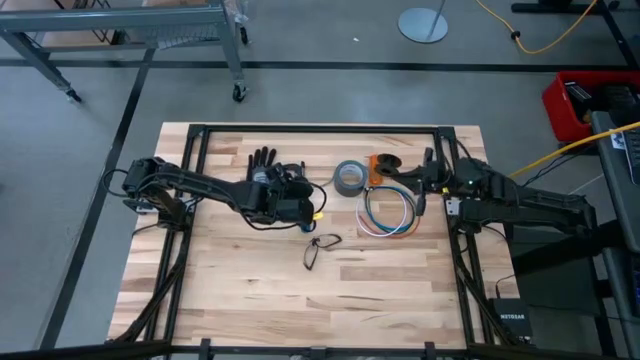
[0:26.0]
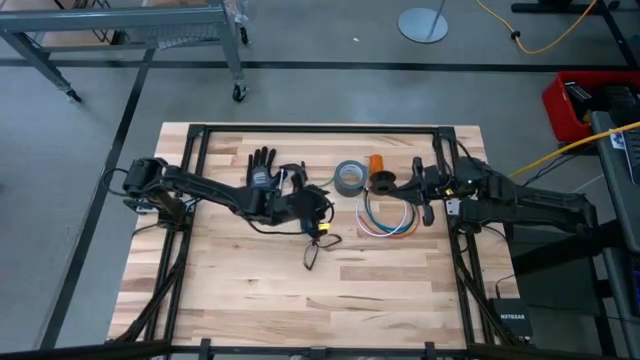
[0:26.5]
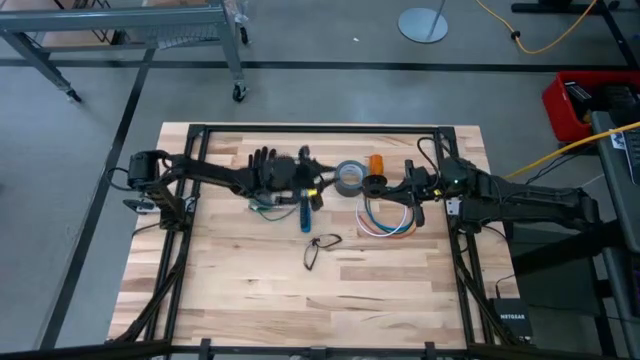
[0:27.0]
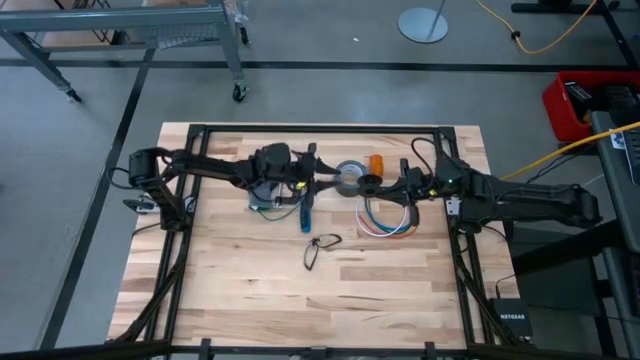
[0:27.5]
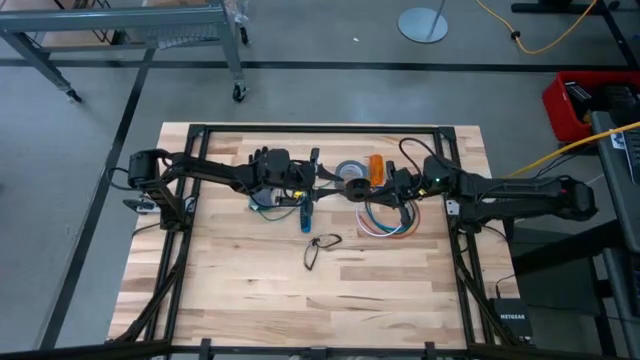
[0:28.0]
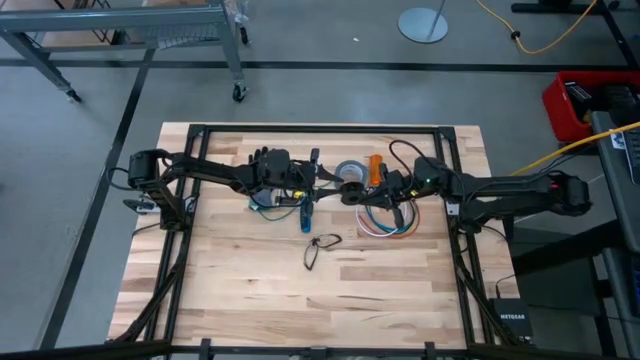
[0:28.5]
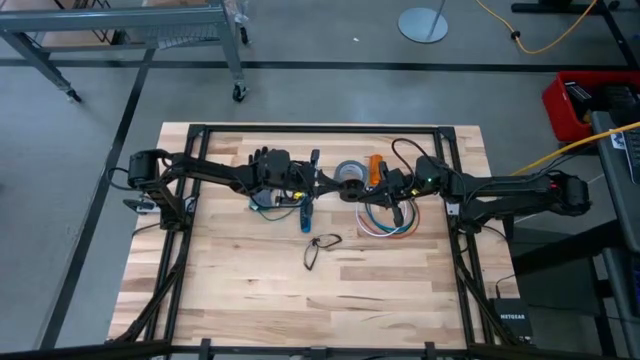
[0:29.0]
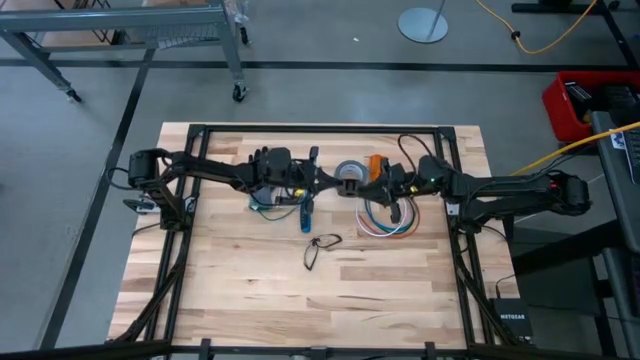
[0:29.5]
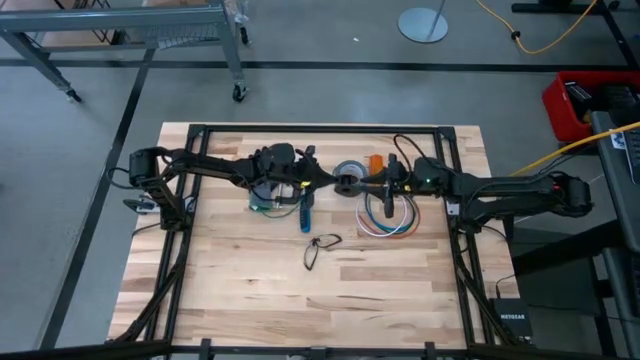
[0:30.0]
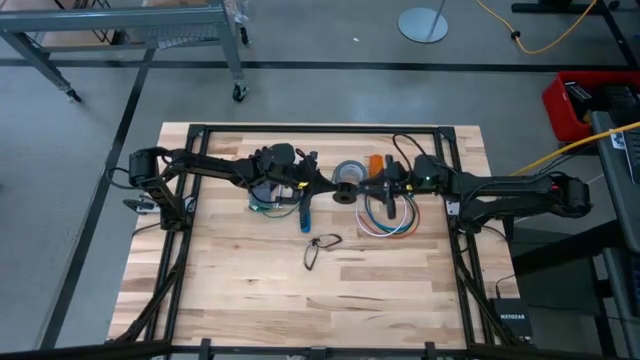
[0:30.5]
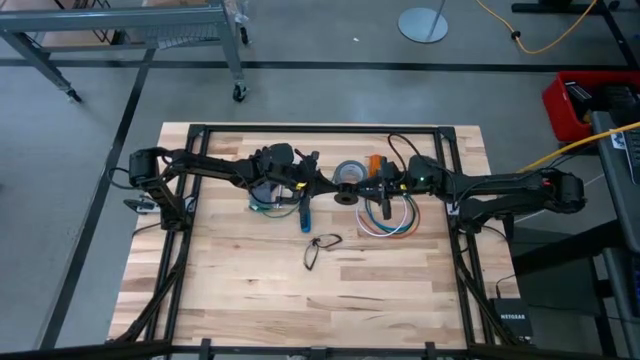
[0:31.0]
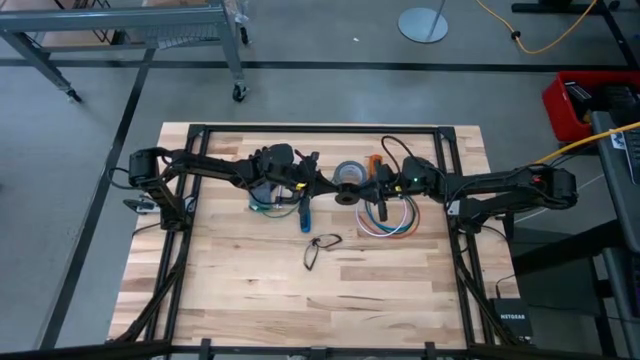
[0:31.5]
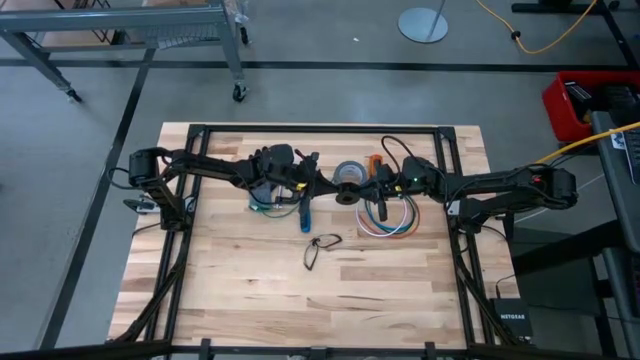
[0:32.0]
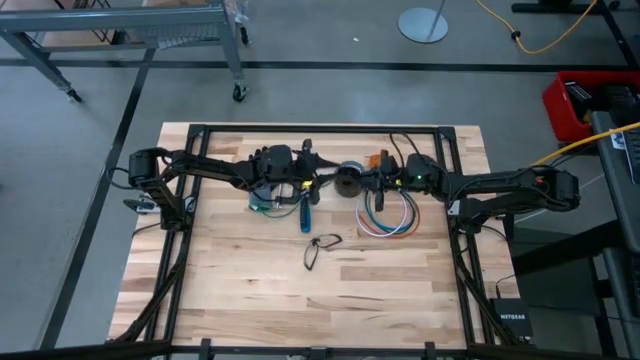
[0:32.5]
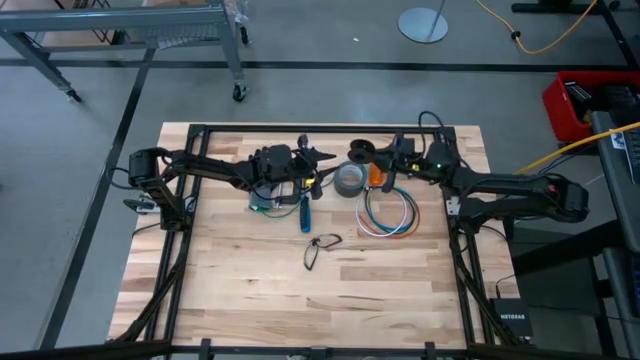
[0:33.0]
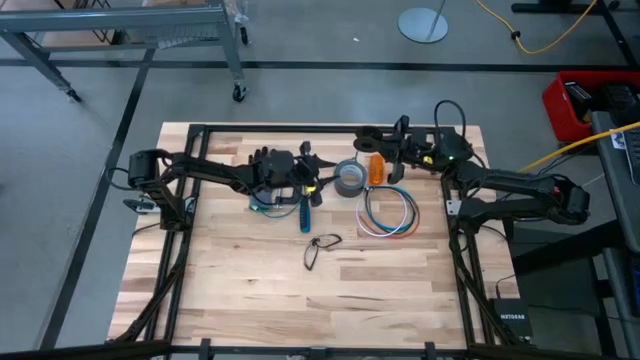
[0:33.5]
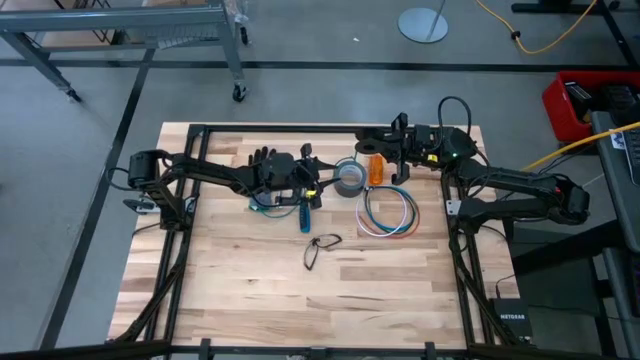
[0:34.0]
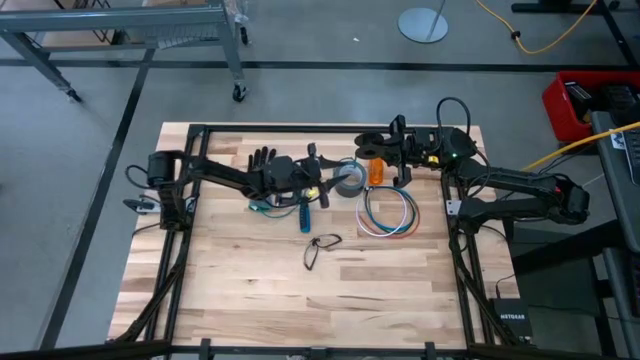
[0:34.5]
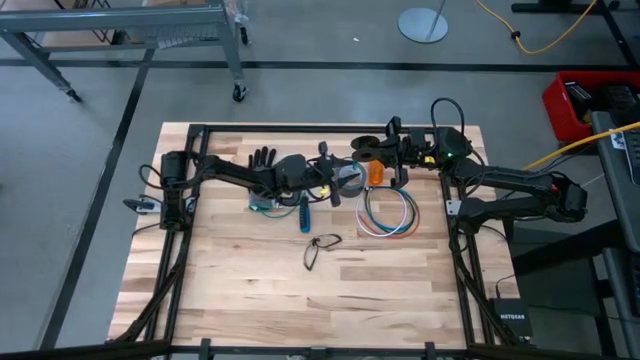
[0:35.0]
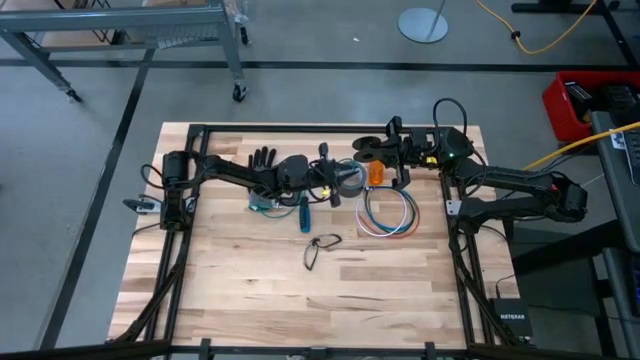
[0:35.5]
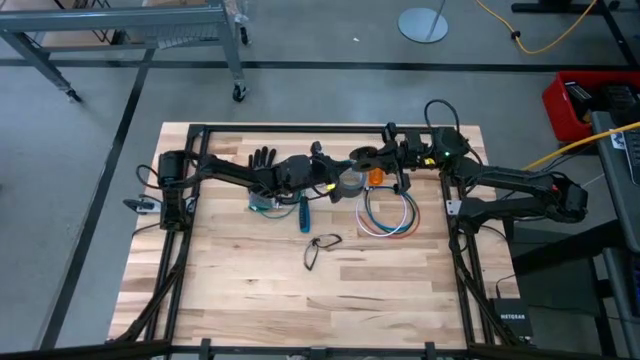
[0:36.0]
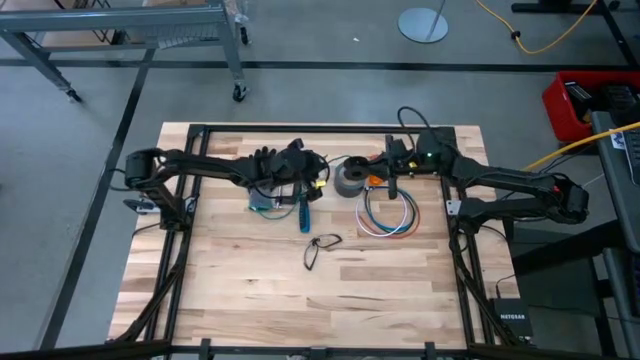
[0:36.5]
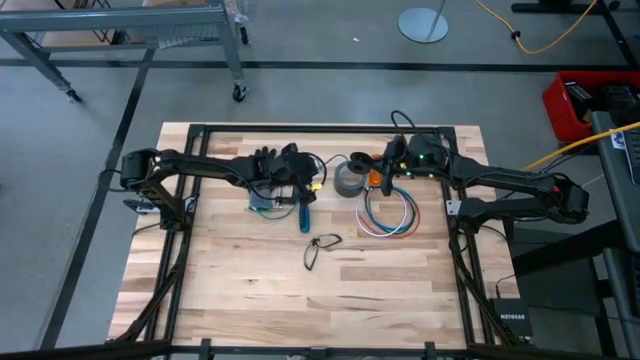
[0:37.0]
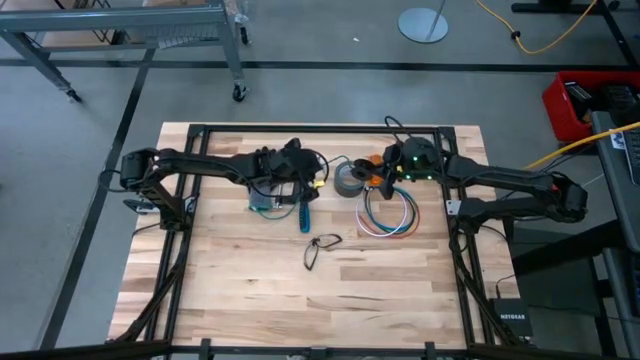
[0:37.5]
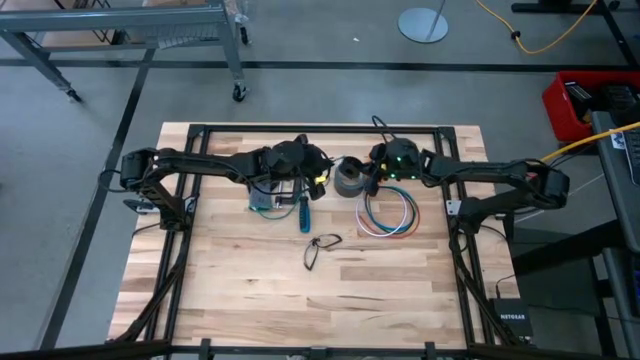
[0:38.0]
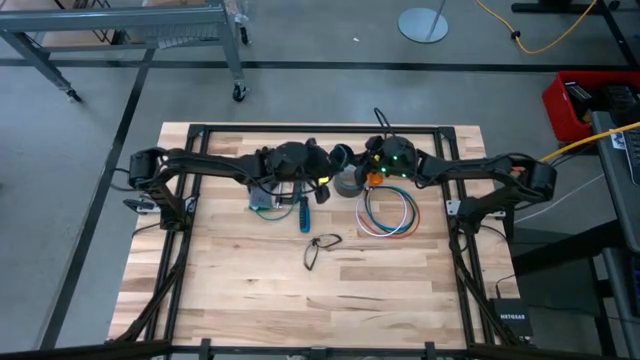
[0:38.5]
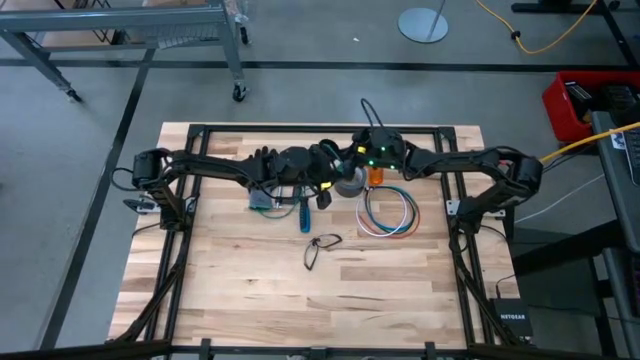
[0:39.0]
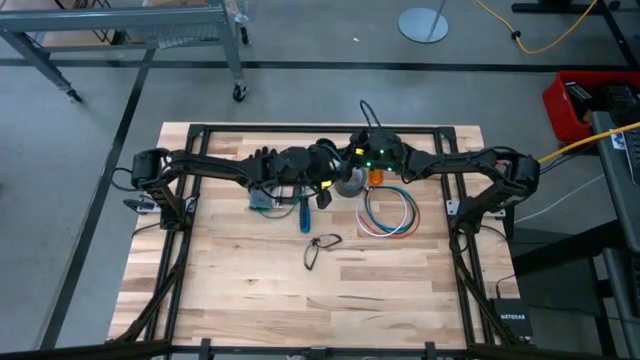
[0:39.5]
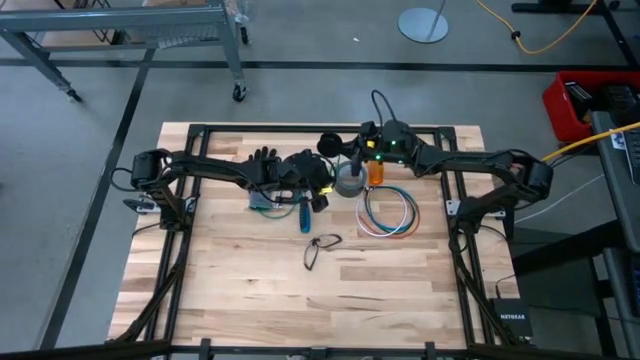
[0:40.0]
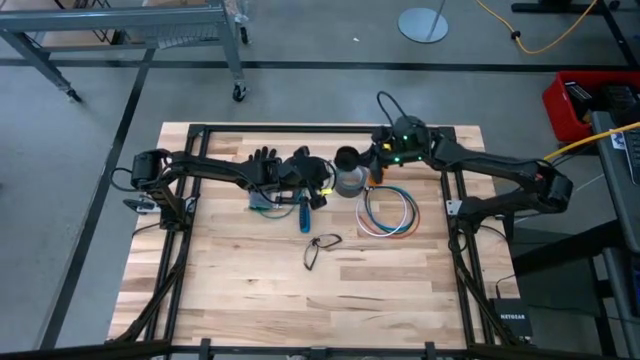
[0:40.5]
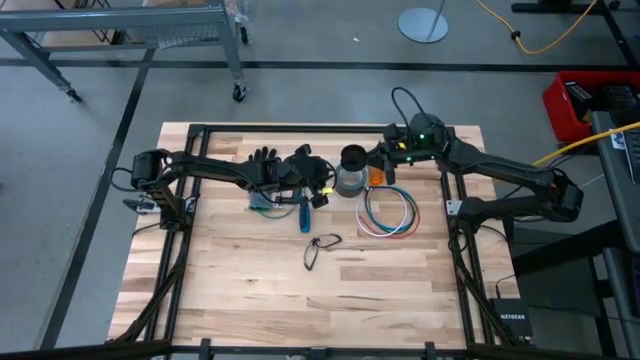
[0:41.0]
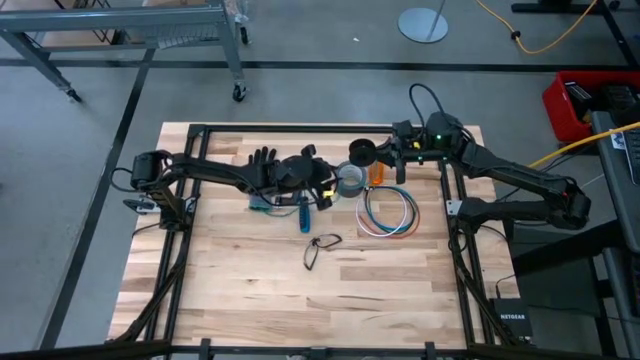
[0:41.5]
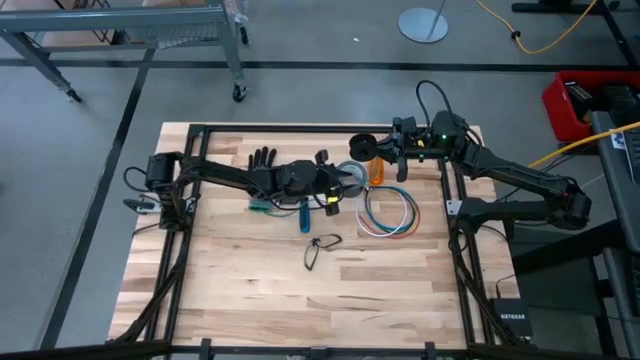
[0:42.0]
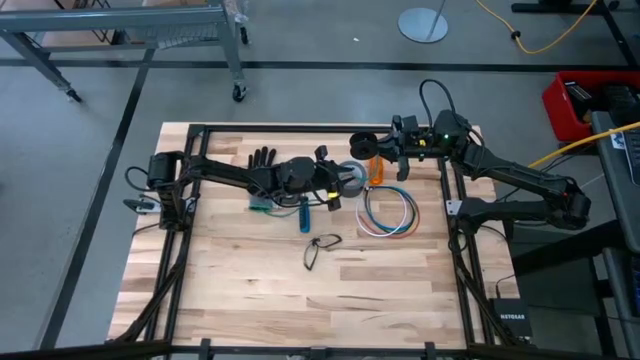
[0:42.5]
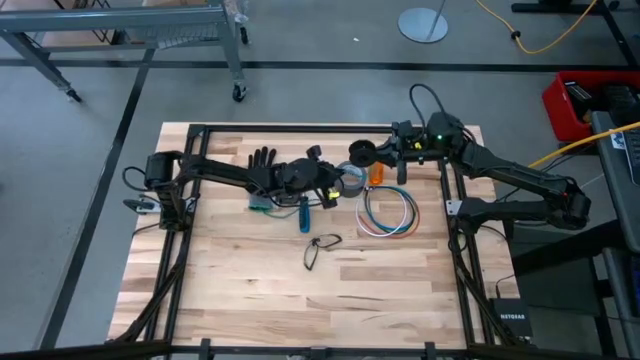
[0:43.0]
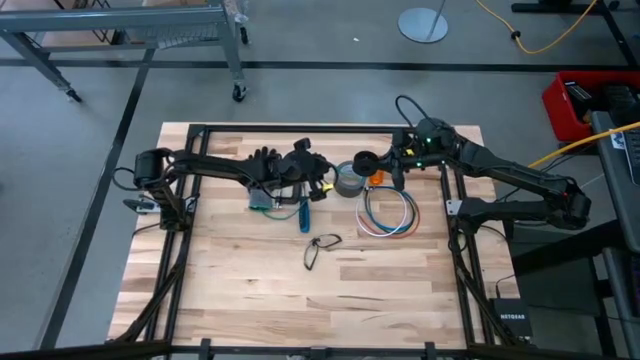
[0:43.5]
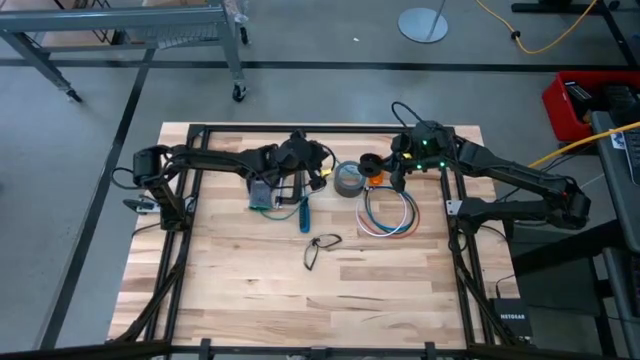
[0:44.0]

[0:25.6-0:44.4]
Task: Coil cords
Coil the green wire onto the spool
